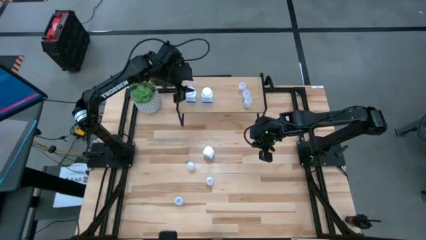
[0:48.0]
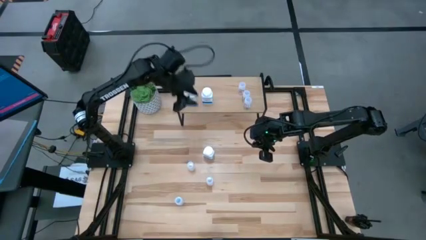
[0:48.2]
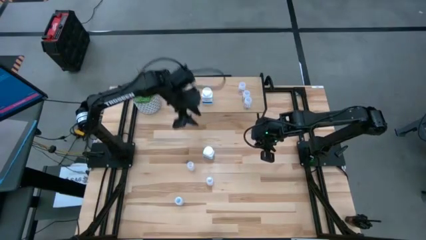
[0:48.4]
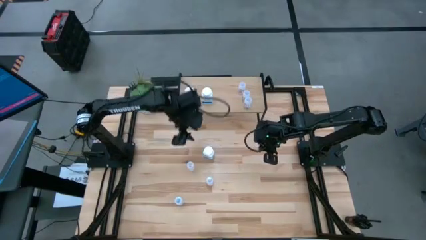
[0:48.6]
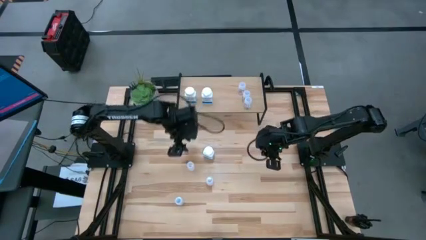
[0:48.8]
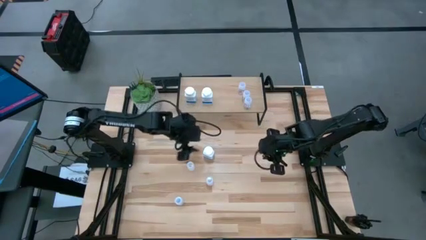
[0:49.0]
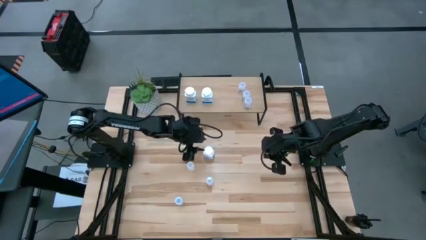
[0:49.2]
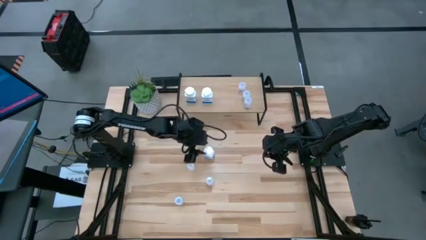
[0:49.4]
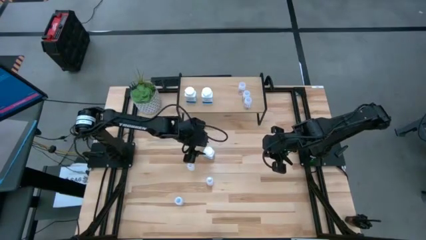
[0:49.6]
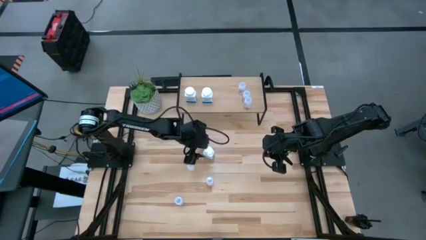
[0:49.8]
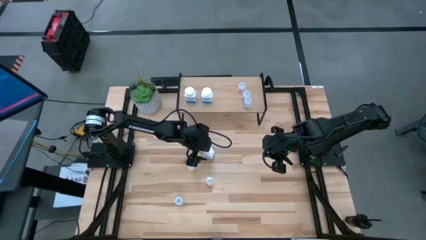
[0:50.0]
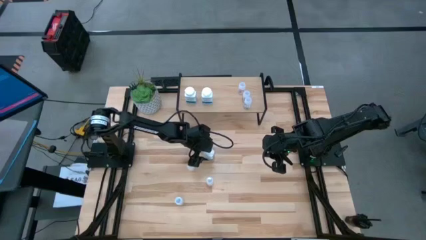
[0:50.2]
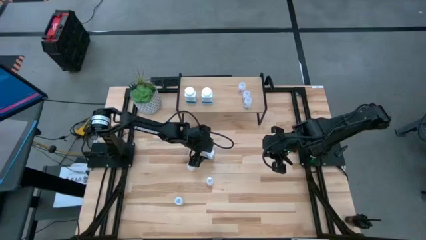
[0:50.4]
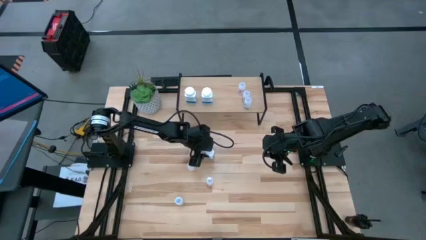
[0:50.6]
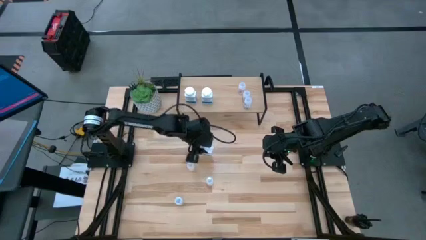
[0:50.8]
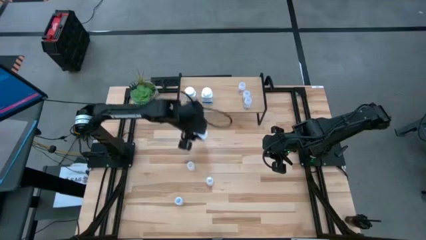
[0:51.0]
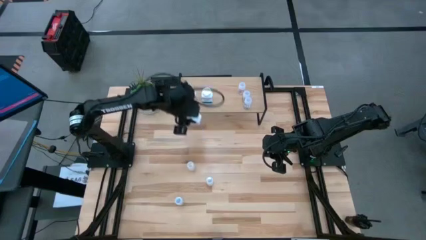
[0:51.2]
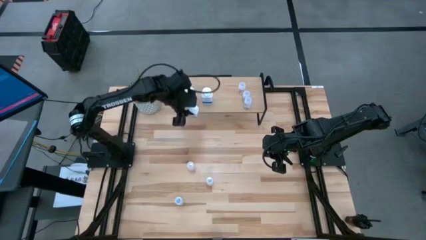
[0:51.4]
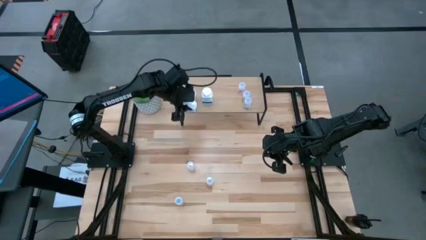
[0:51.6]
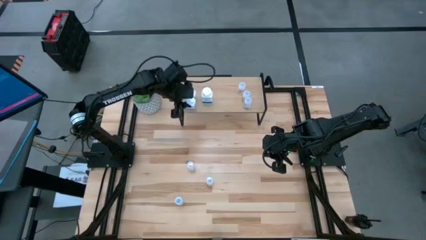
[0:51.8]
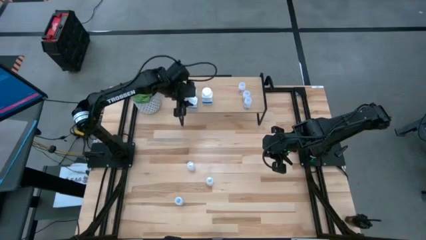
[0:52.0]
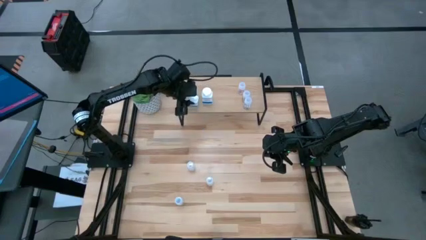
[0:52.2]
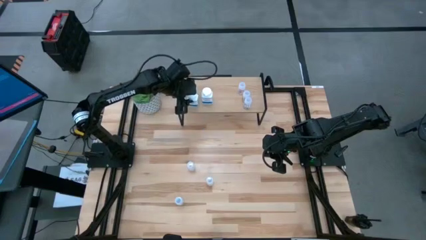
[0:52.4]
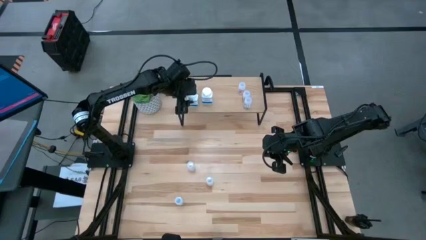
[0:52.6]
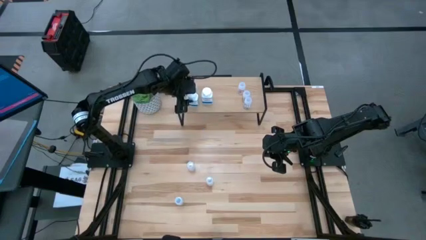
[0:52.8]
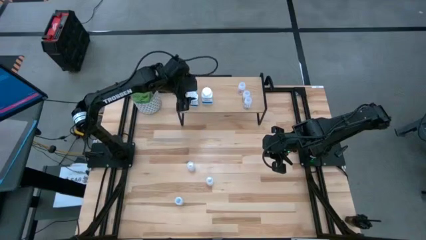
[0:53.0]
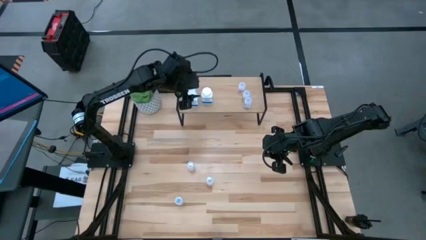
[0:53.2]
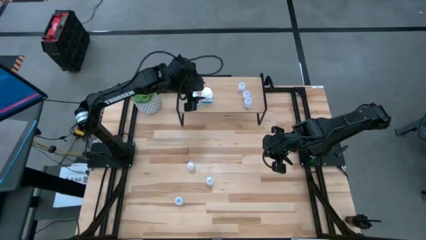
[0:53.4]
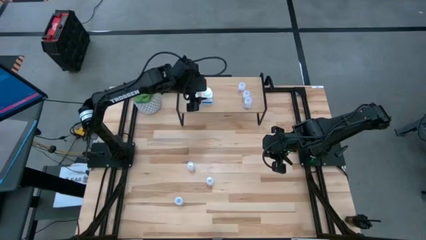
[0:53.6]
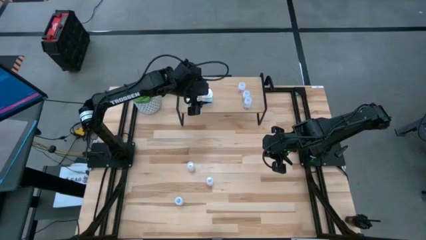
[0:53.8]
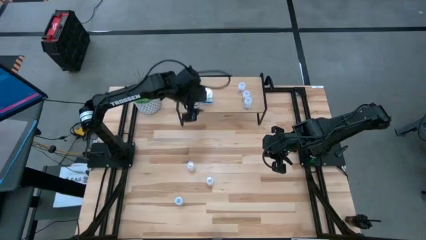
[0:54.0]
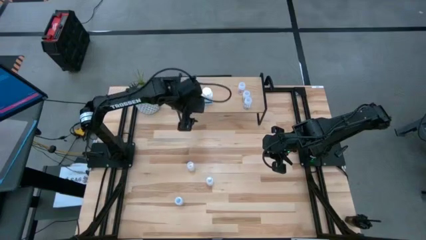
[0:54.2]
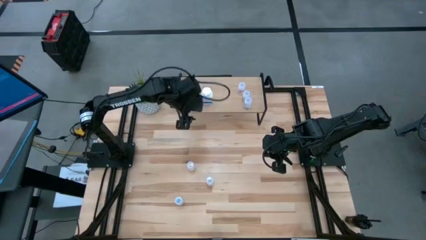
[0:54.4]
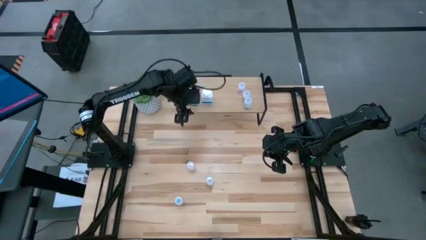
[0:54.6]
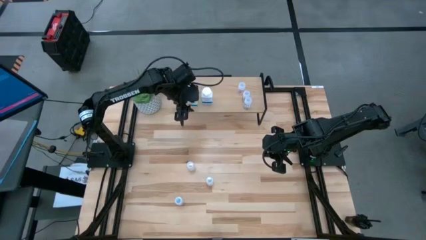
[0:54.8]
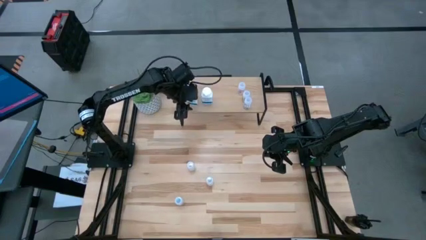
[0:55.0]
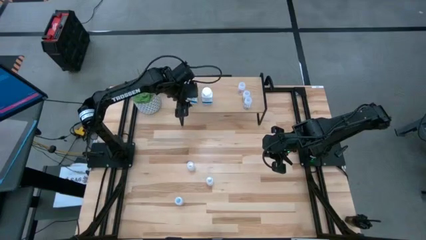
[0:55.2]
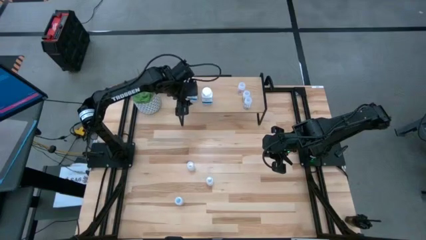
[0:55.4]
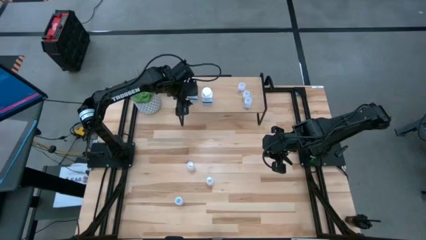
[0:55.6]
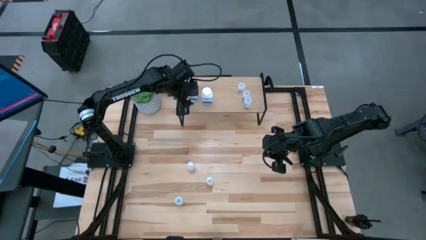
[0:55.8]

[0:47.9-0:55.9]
Task: Pick and place medicine bottles onto shelf by color
Align the blue pill bottle with the other blue pill bottle on the shelf

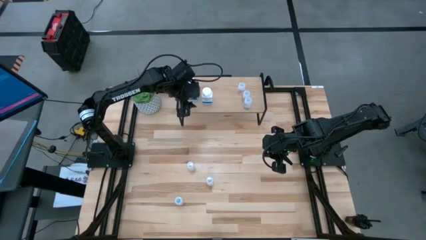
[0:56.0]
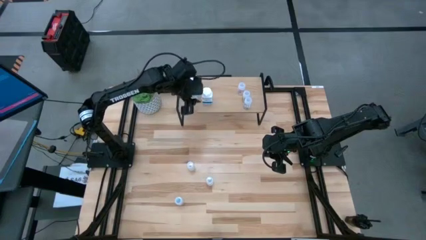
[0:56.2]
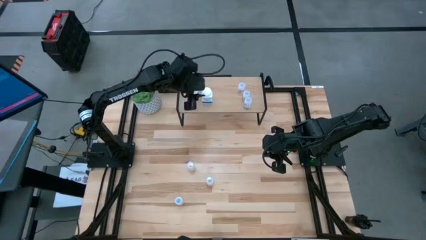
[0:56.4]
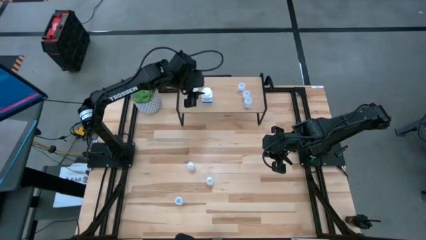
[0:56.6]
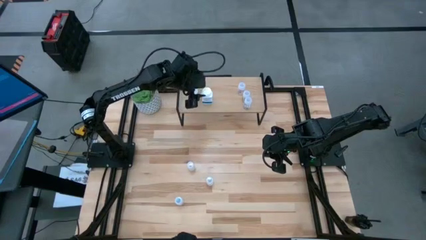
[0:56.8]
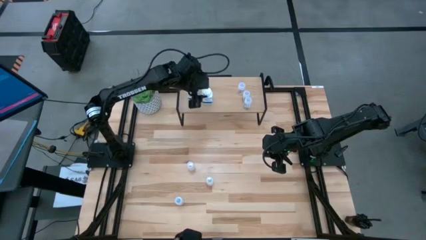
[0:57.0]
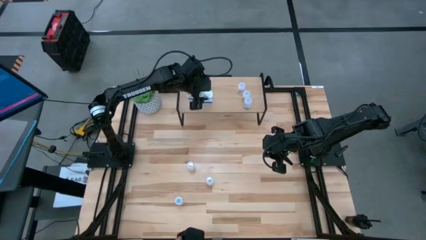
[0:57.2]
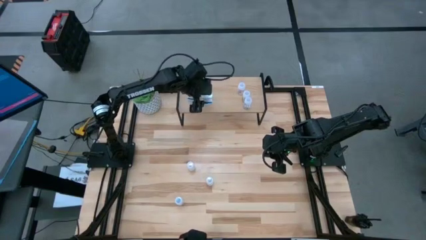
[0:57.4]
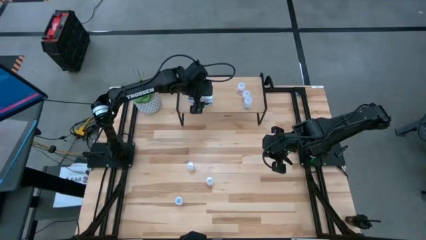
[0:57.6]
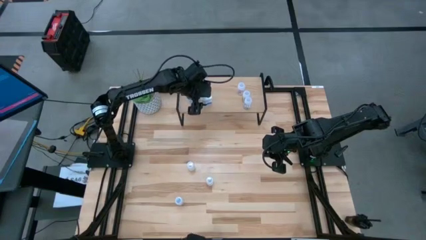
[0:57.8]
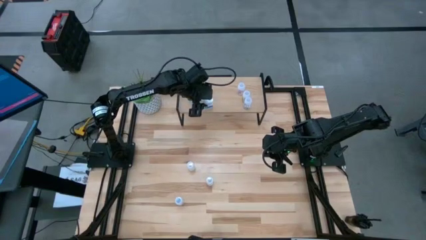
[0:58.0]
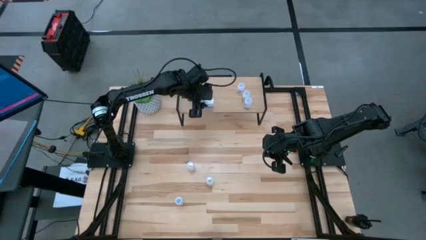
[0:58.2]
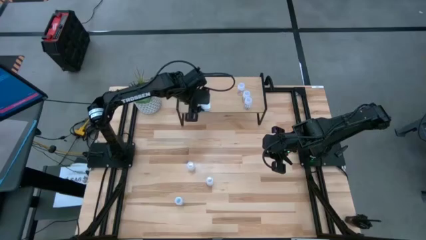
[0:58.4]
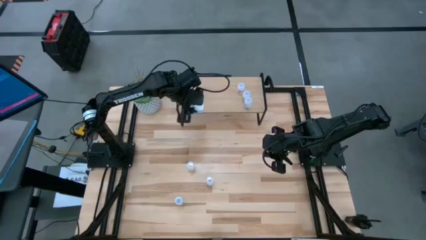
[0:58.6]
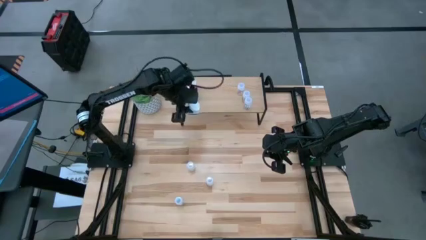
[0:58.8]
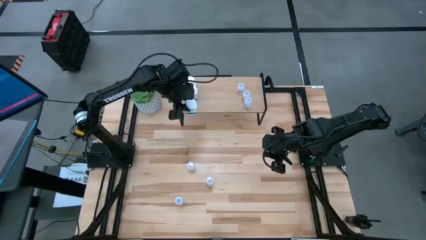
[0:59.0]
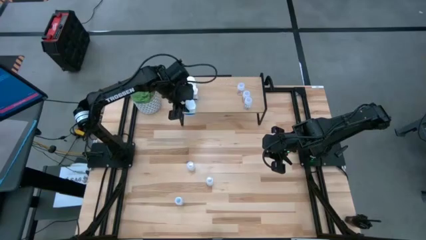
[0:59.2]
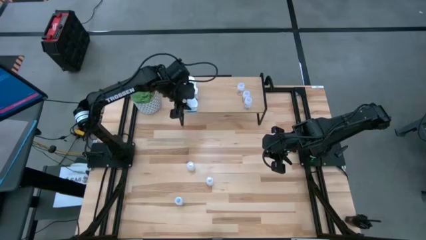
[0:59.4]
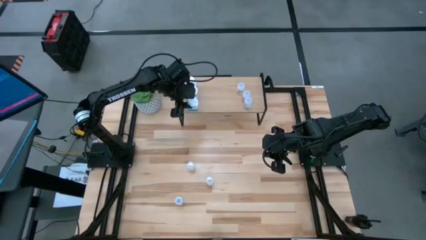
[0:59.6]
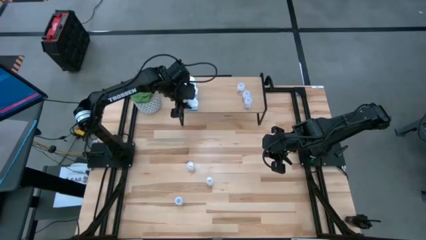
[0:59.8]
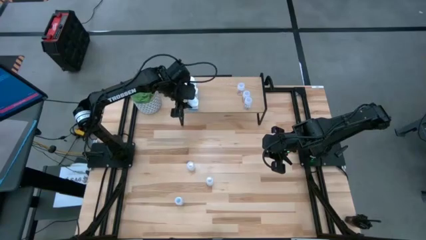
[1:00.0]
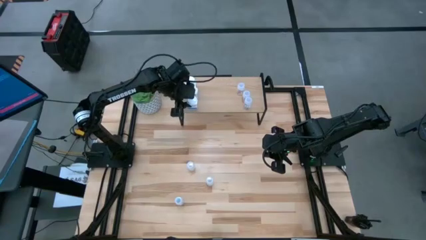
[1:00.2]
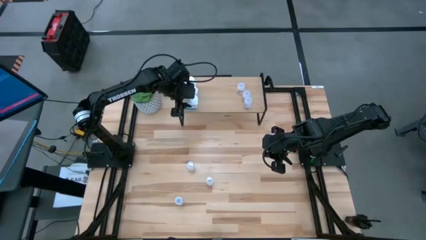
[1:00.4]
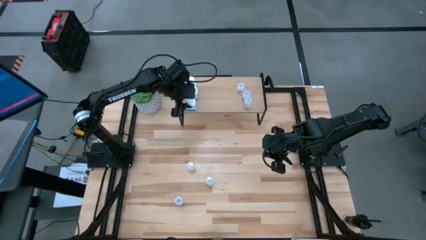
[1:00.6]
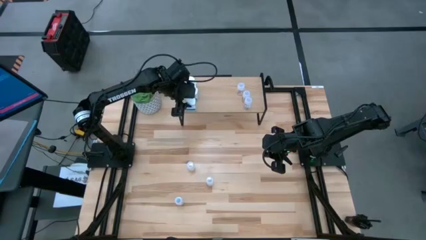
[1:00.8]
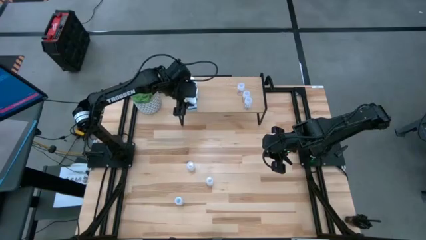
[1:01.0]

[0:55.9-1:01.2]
Adjust the blue pill bottle on the shelf

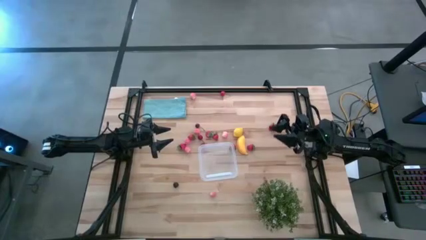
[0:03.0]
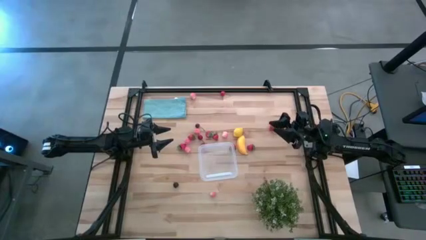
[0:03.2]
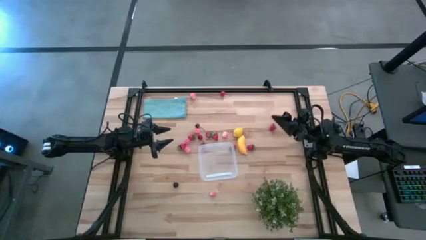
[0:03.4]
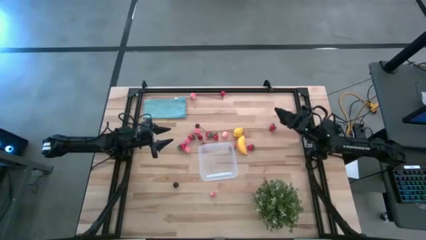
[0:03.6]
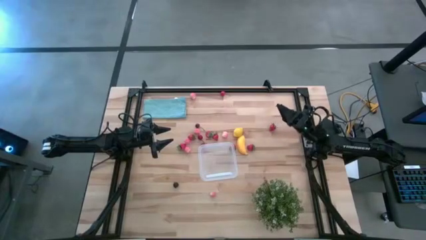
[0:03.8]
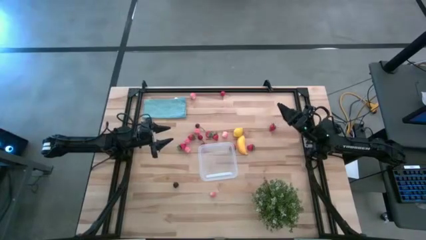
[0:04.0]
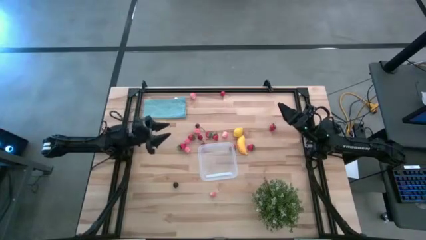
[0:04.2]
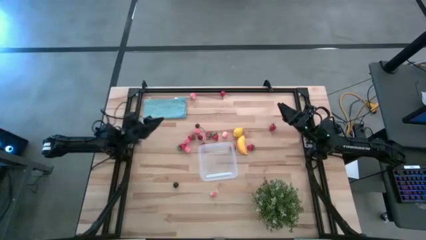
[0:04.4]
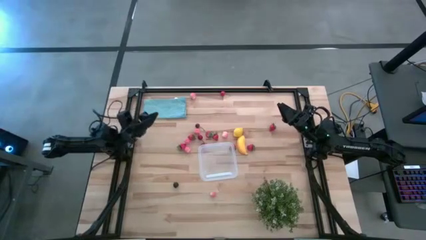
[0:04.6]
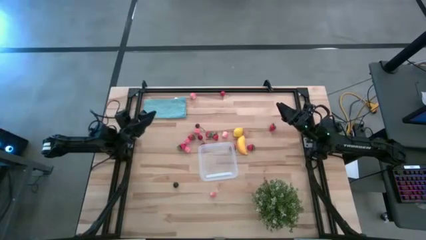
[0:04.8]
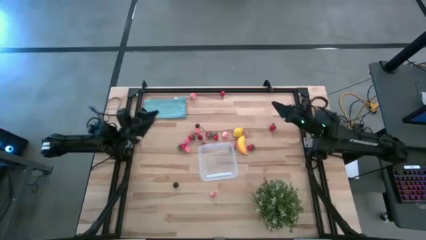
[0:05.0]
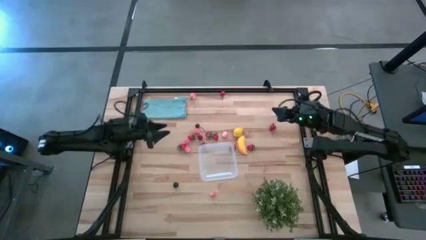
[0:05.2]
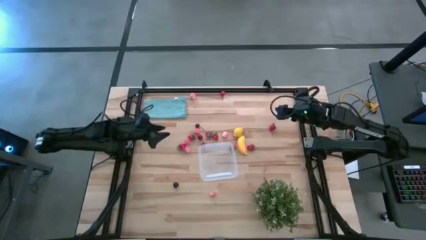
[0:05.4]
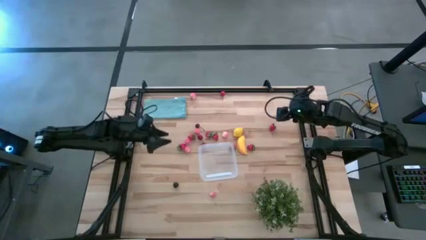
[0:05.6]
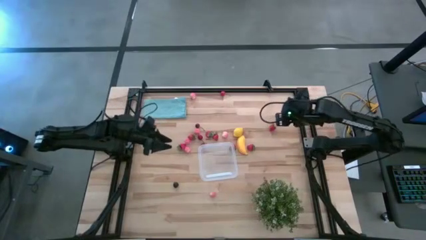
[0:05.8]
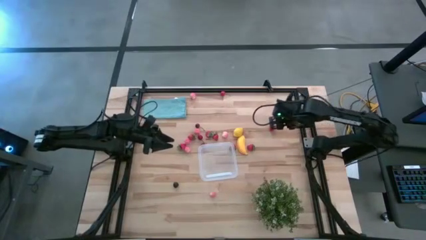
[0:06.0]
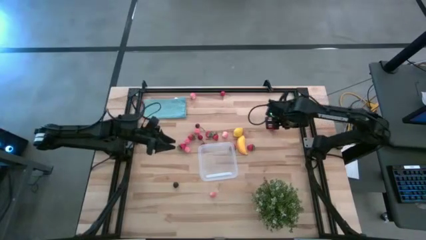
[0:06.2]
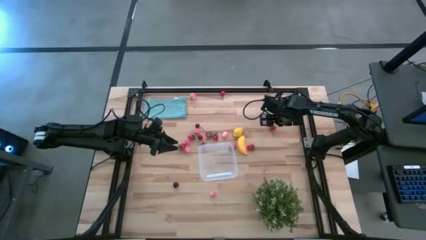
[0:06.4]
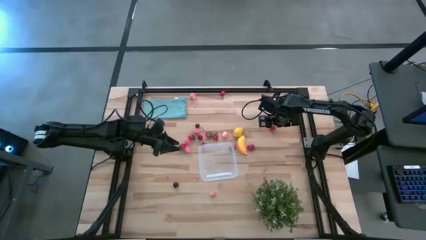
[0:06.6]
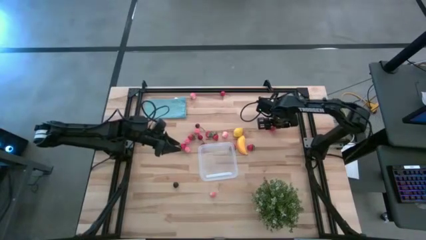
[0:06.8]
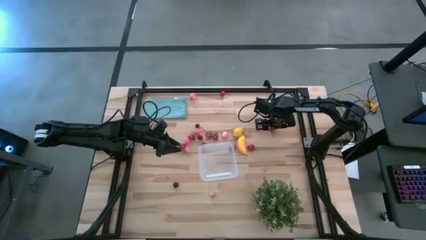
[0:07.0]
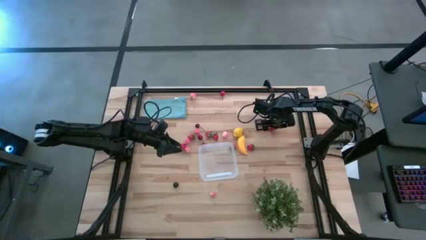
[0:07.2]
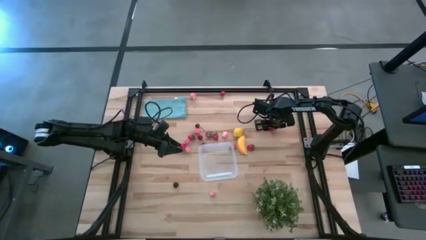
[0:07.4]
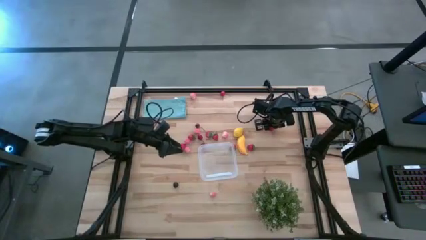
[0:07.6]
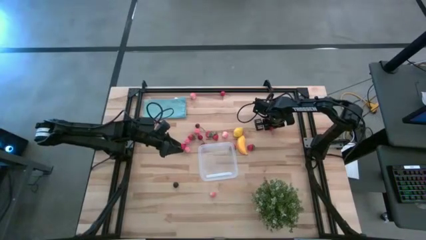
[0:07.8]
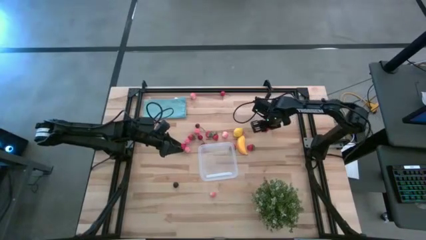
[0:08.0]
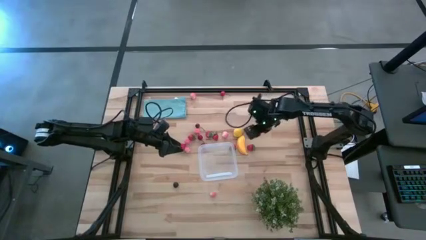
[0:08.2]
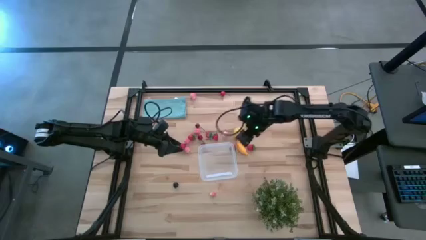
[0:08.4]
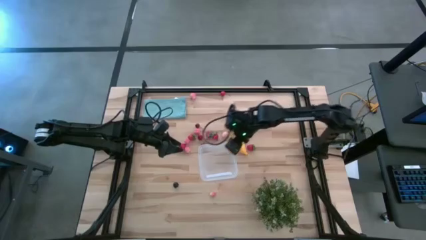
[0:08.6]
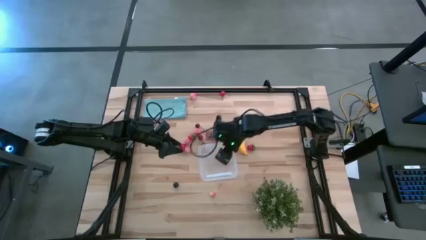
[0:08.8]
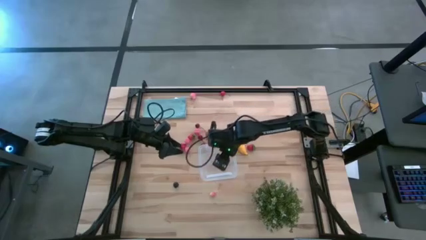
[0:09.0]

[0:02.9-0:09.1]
Task: Pick and placing Produce into tupperware
Put the red strawberry into the transparent bin
